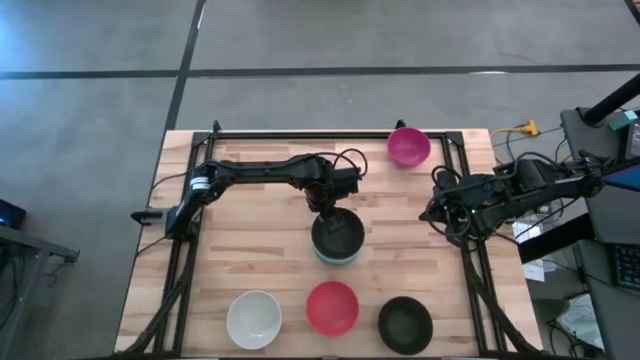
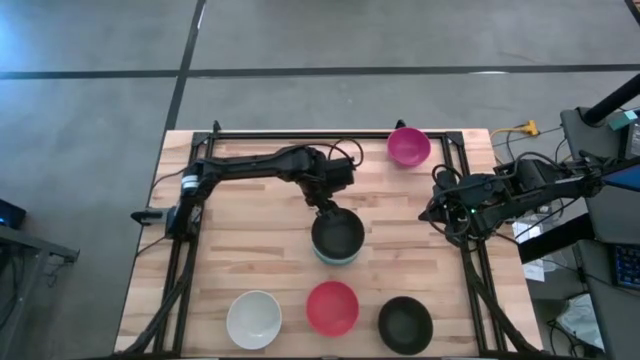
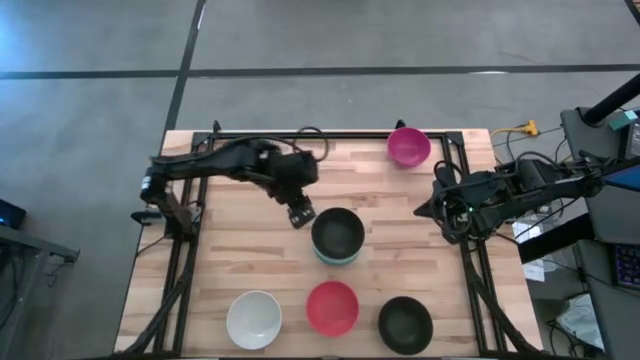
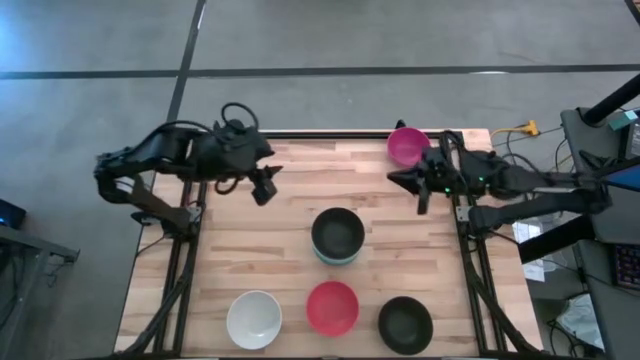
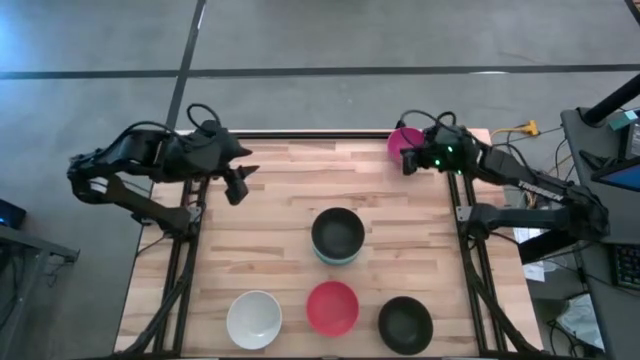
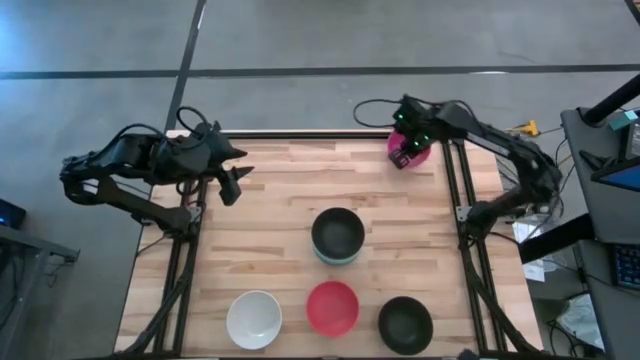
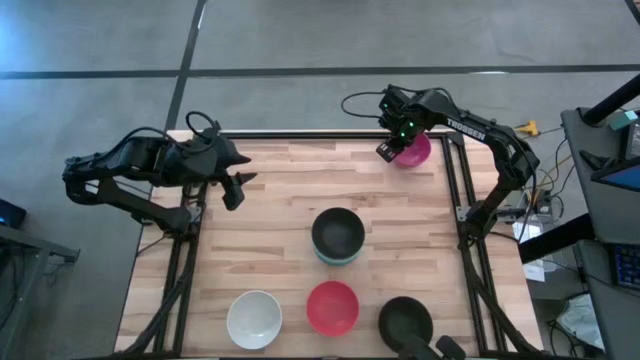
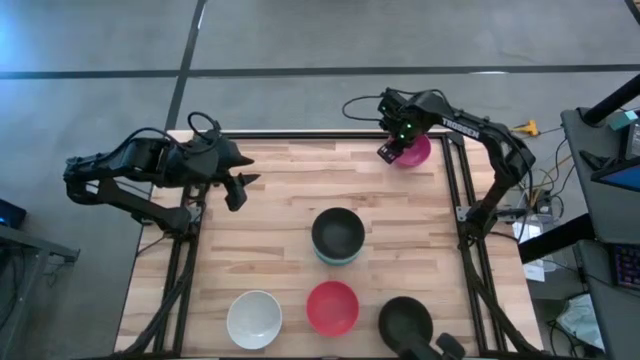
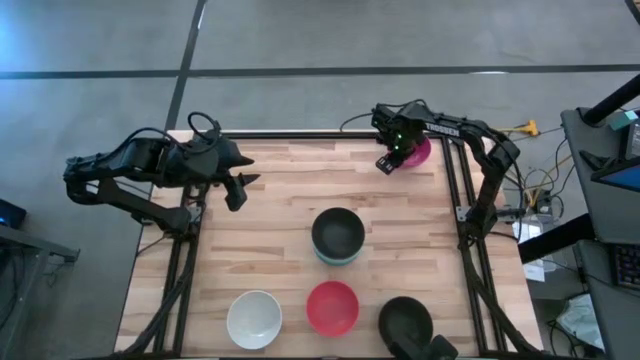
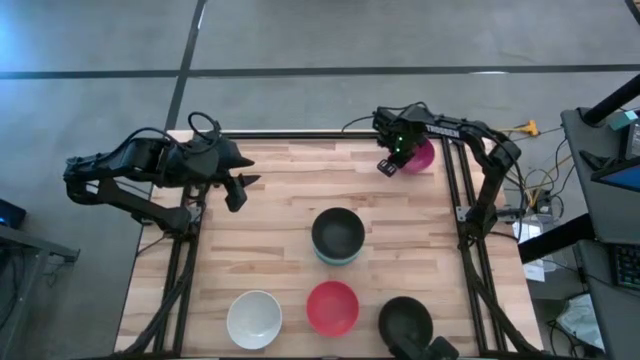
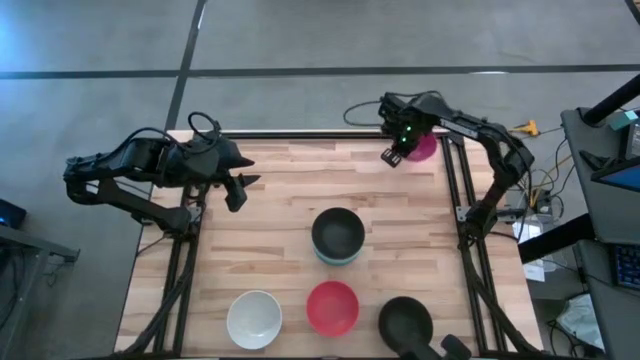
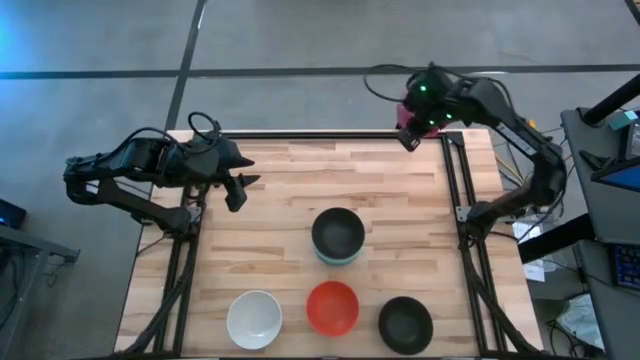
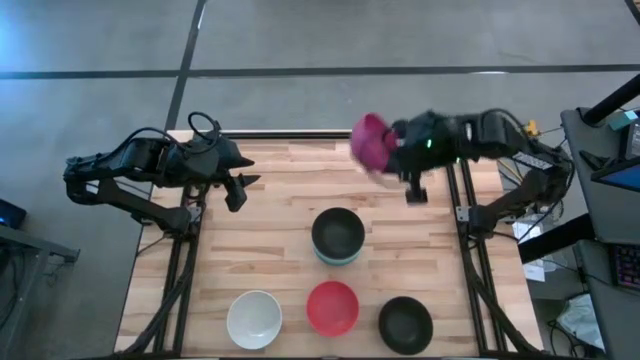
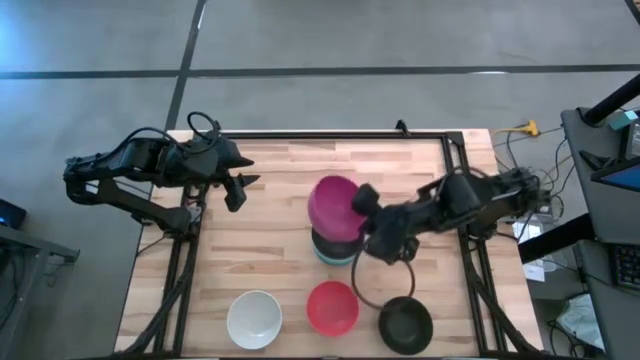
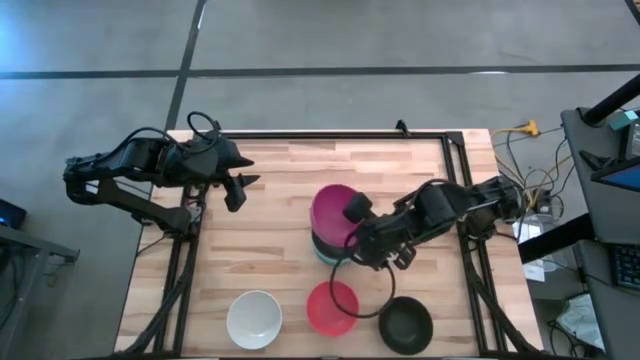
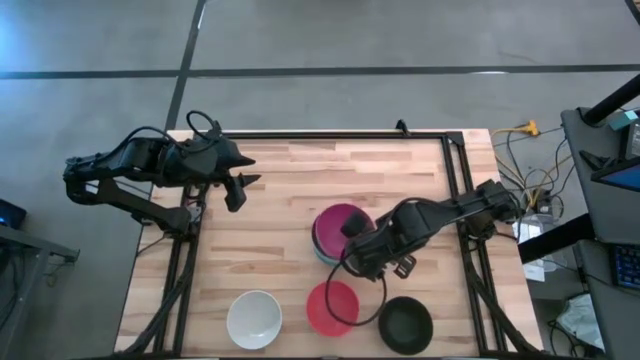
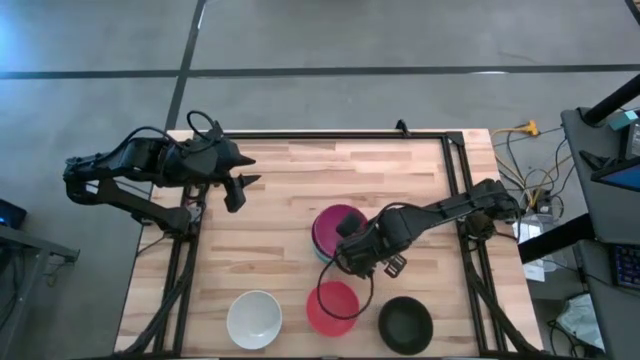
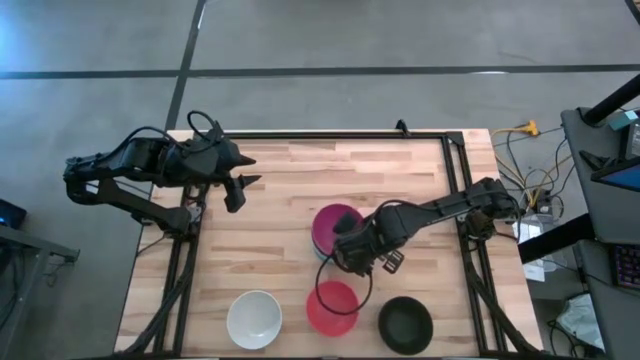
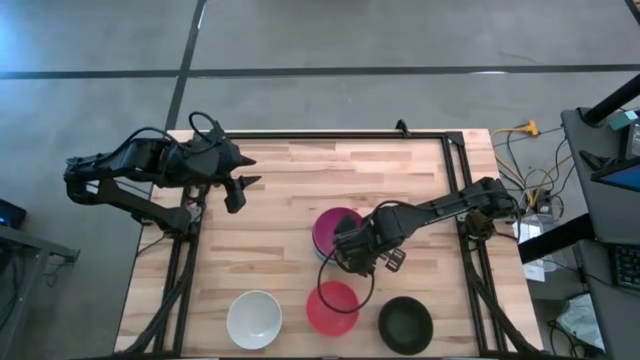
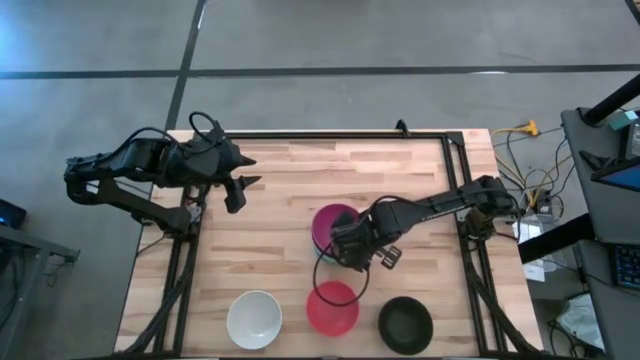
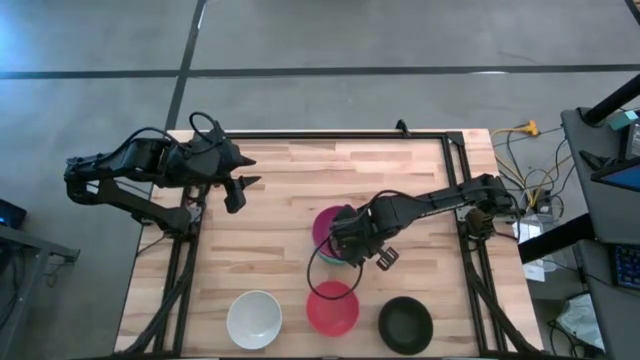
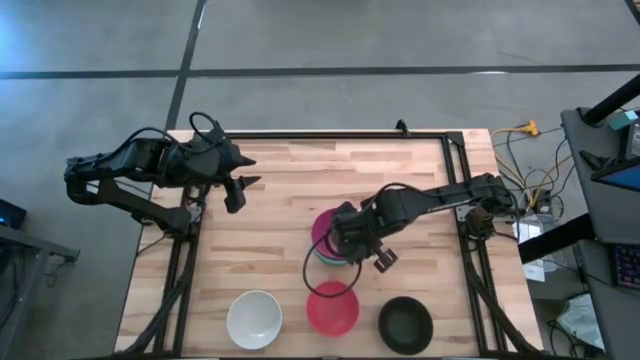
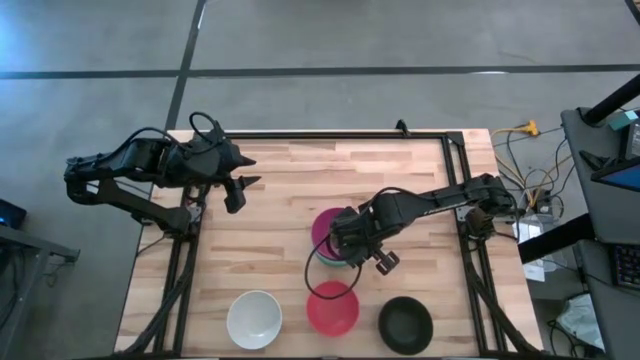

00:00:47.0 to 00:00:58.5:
Task: Nest bowls inside each other
Stack the pink bowl on top of the top black bowl

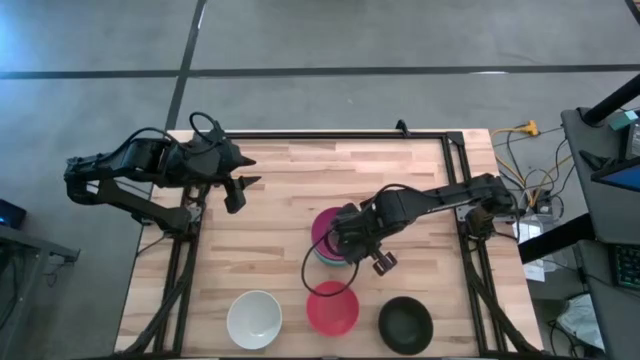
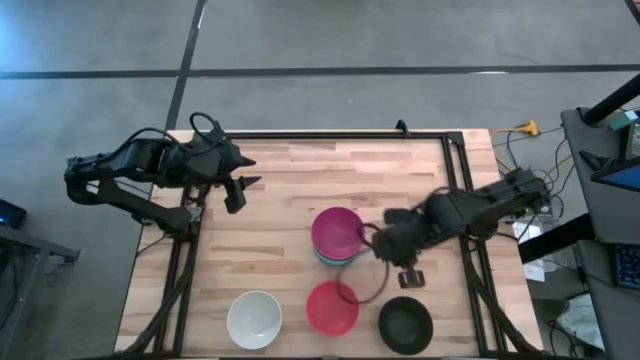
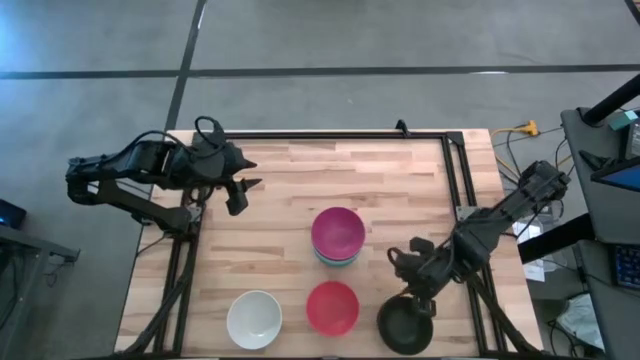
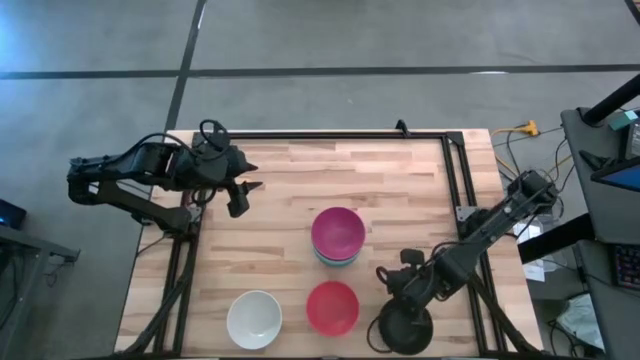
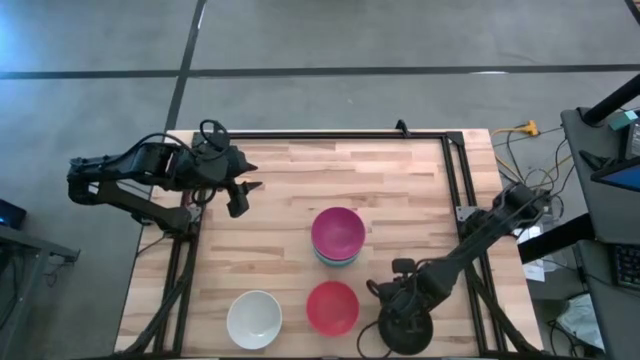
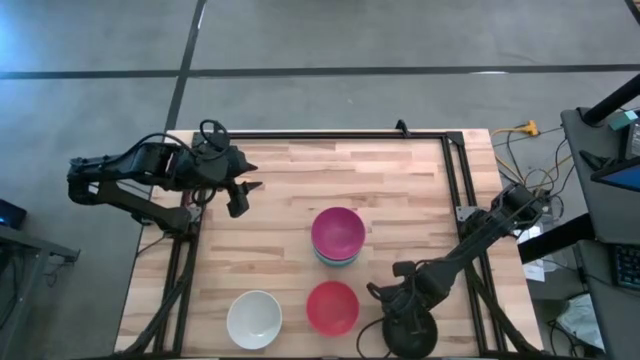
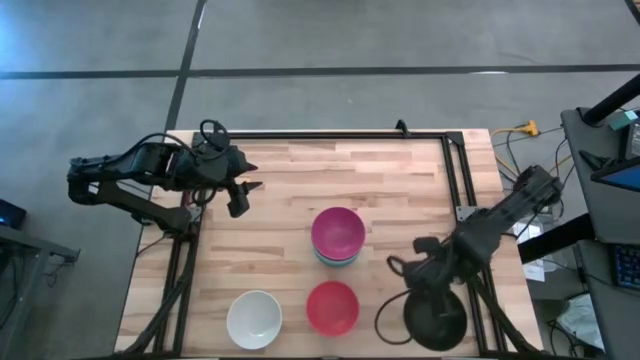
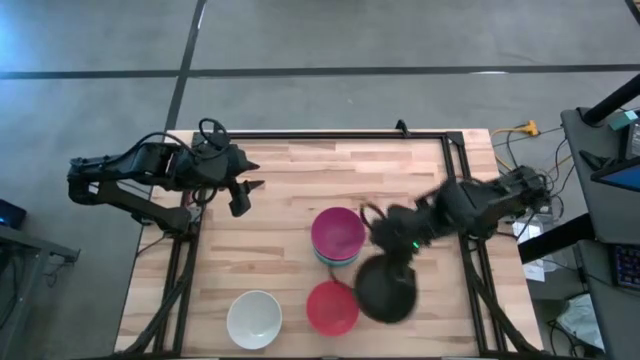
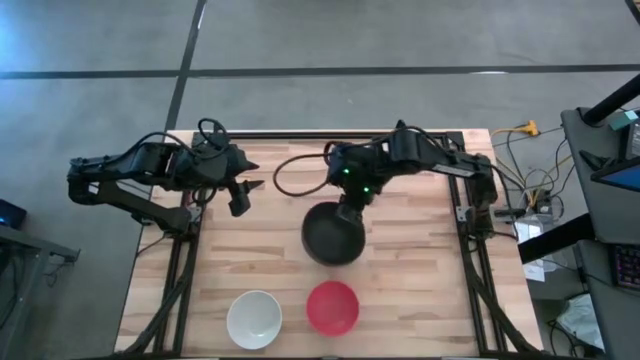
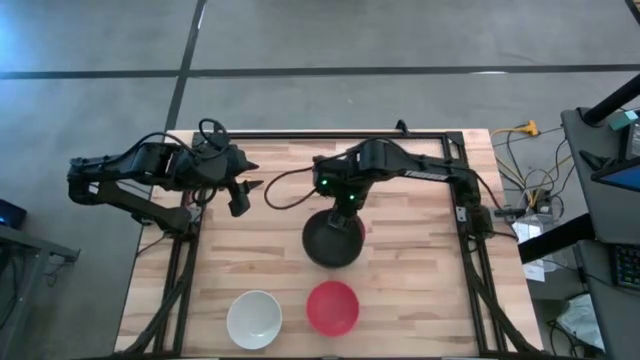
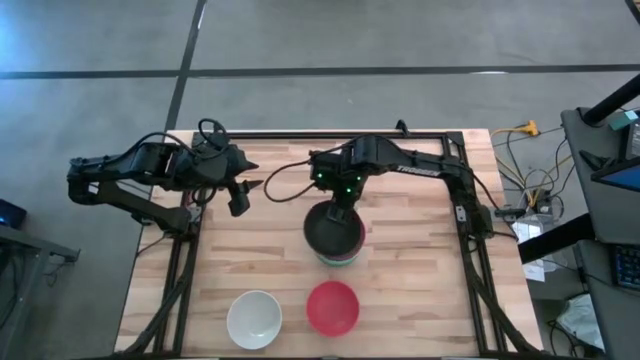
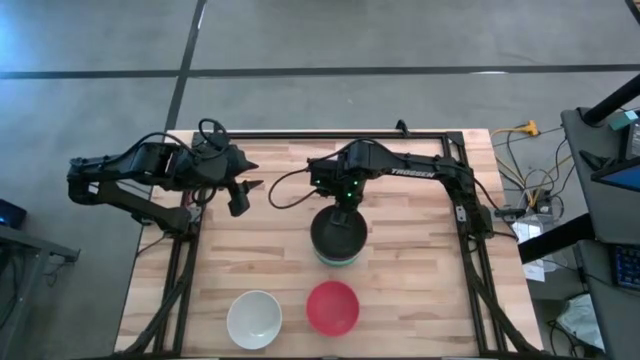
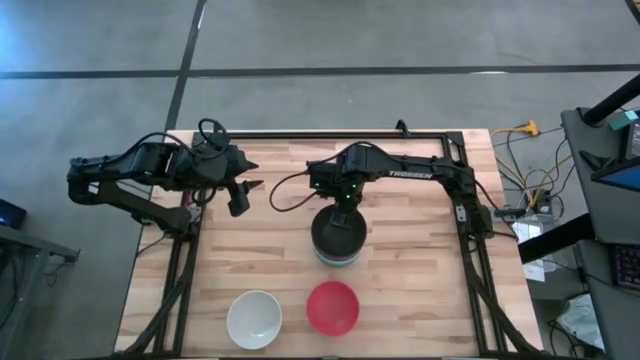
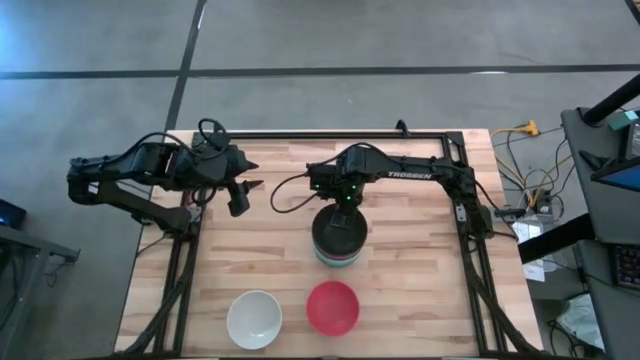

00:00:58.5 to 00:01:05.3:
Stack the black bowl on top of the pink bowl

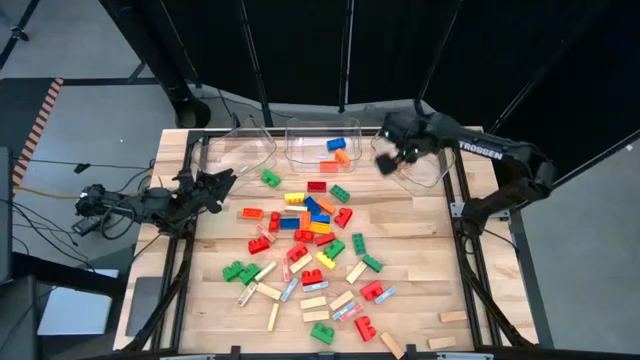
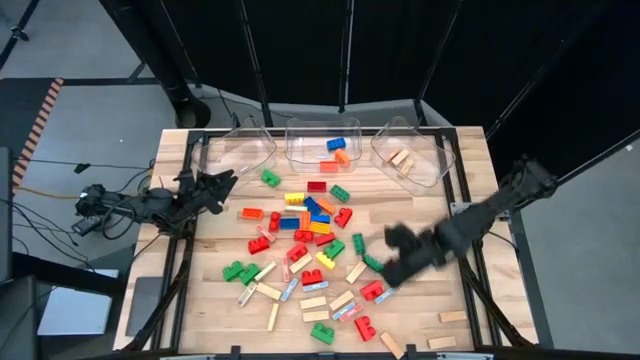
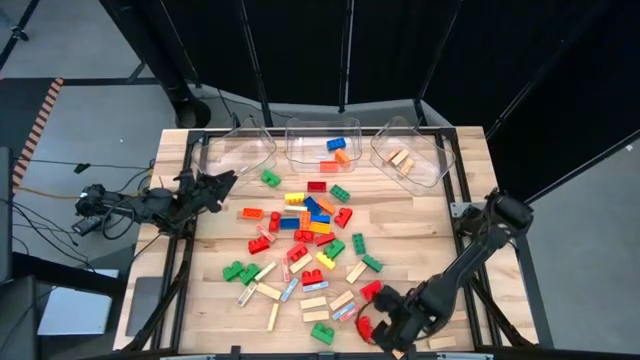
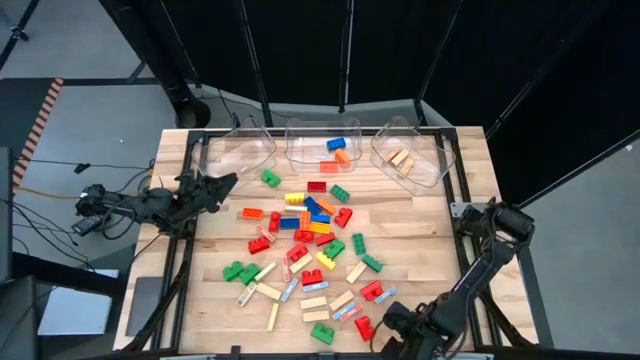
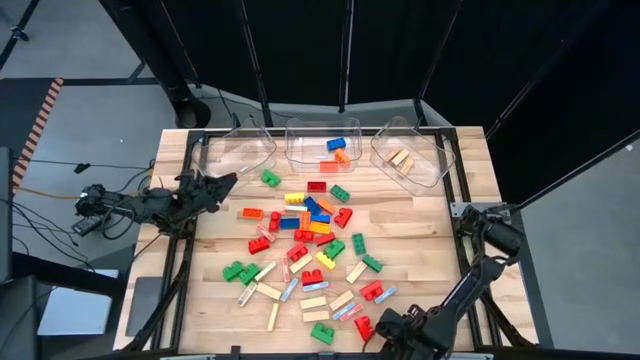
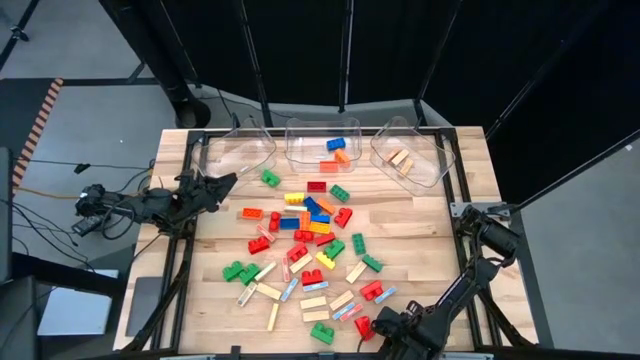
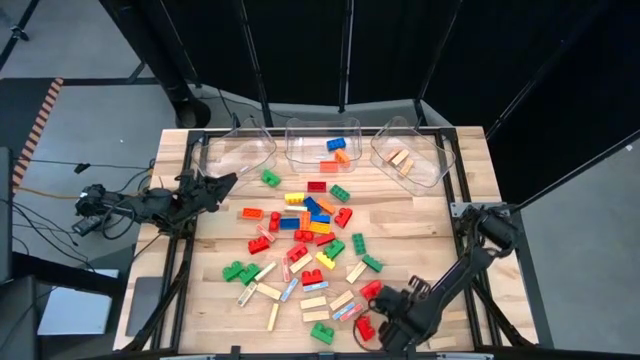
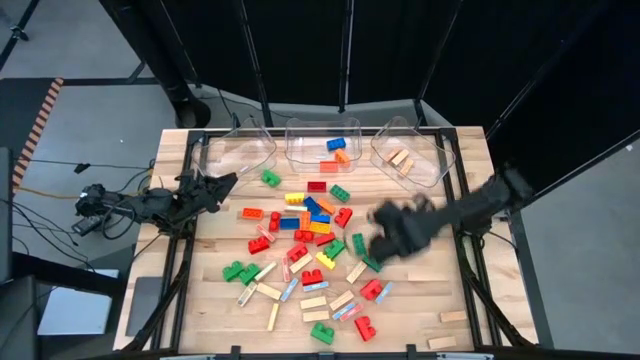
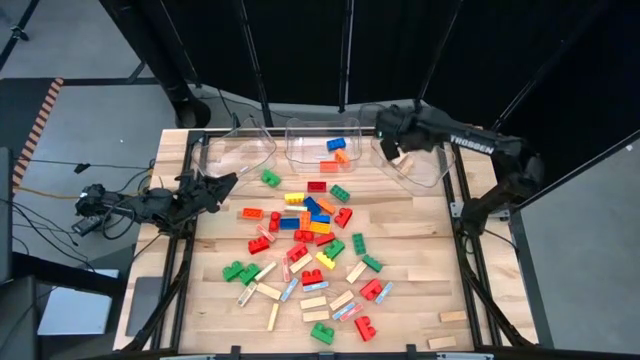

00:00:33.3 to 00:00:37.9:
Task: Sort blocks by size
Put the brown wooden block into the right transparent bin
